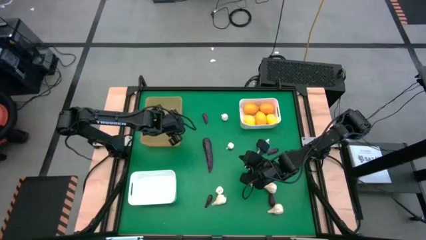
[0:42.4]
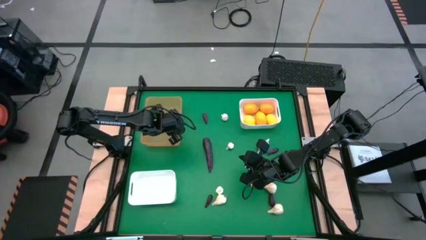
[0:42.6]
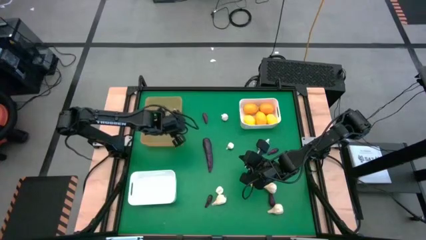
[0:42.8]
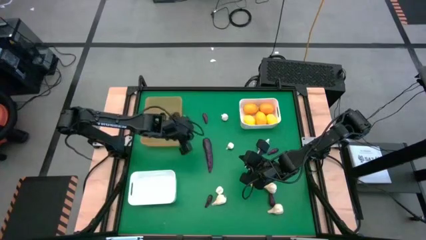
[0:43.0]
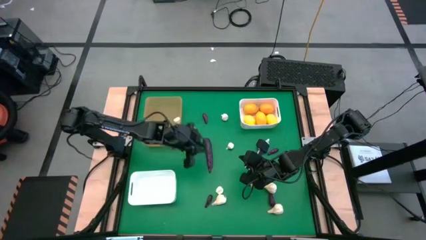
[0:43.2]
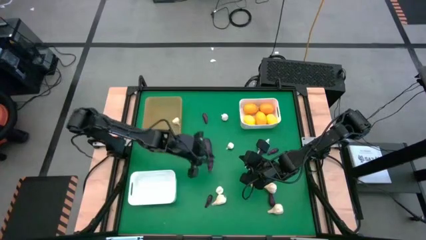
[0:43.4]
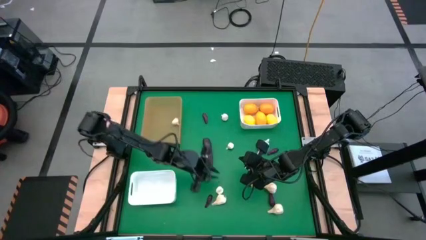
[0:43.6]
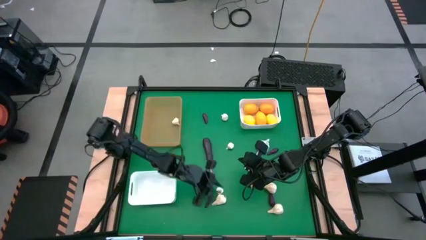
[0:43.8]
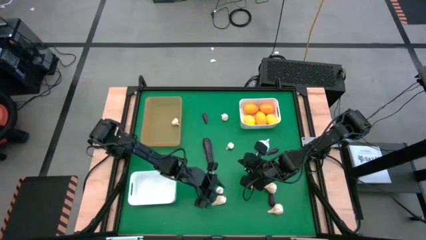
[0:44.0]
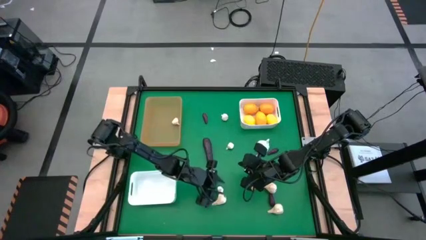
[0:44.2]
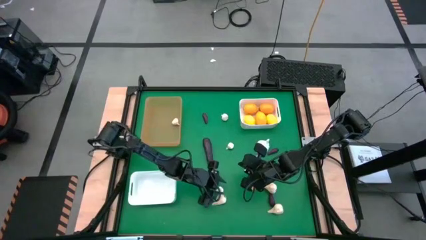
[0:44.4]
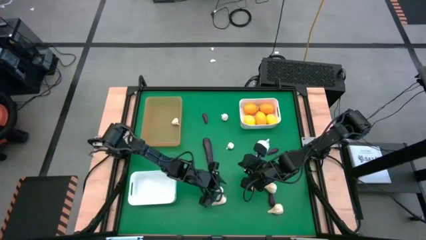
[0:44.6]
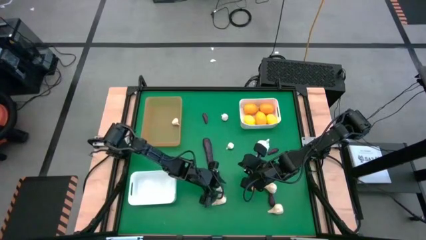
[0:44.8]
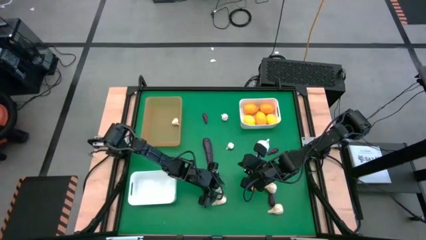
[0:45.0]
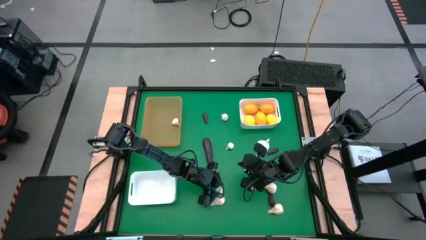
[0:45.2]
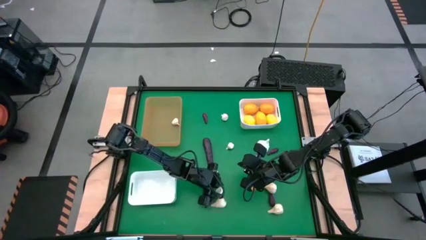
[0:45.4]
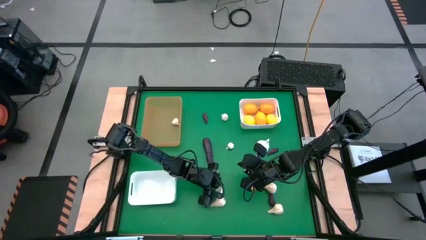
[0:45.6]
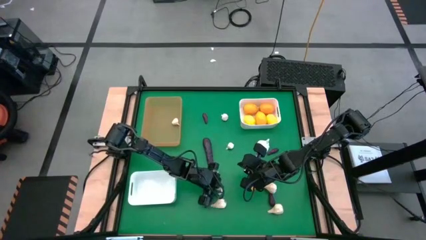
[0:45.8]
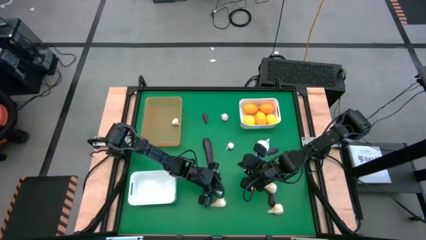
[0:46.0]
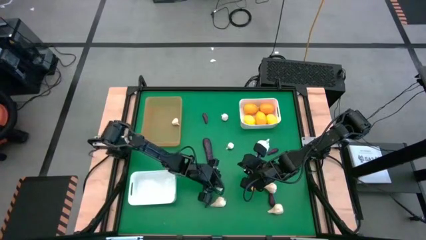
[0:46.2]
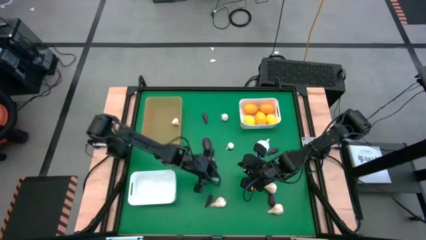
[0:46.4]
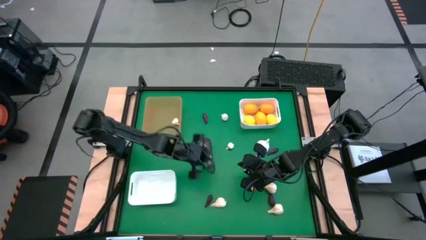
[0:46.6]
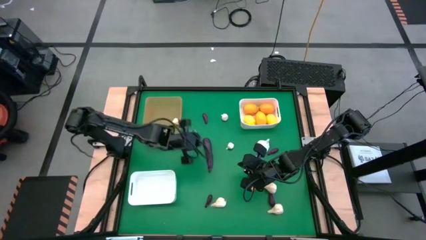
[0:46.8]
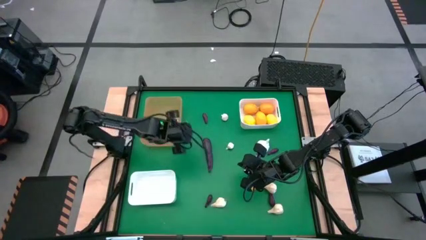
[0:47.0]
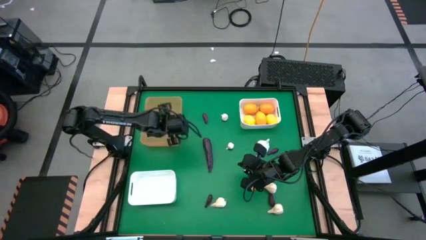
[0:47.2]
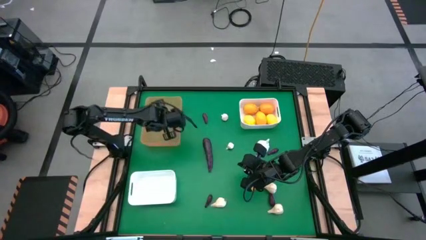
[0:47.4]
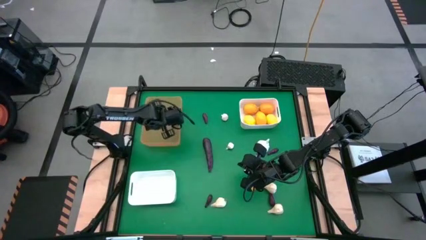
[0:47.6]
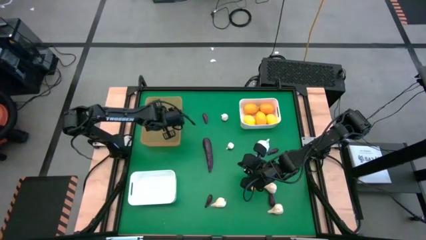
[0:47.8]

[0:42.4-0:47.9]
Task: Sort produce into baskets
Put the white garlic into the orange bin

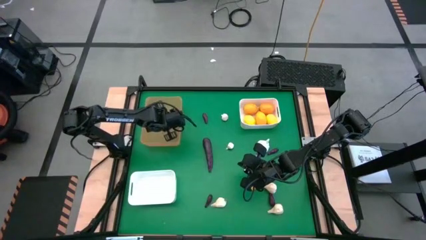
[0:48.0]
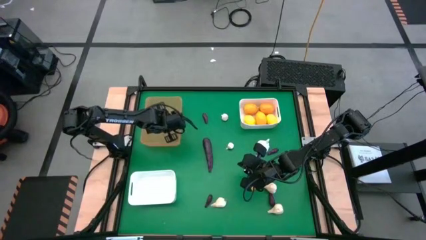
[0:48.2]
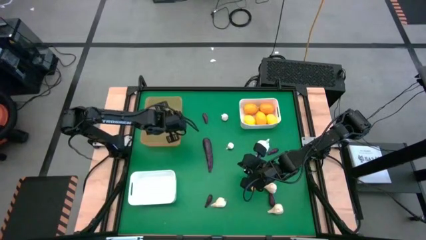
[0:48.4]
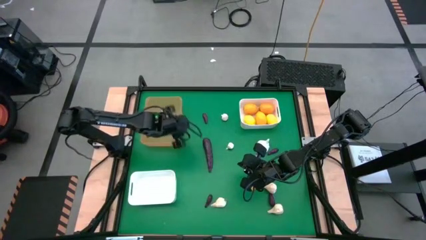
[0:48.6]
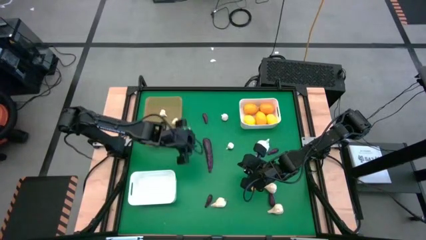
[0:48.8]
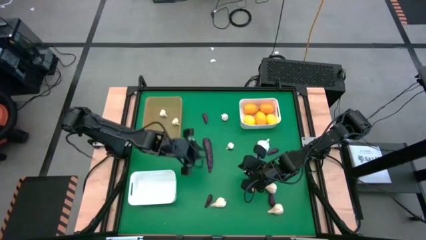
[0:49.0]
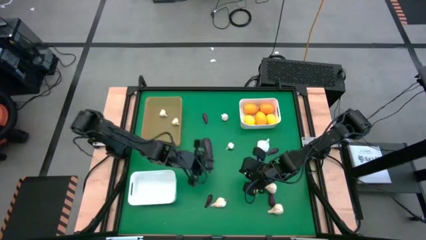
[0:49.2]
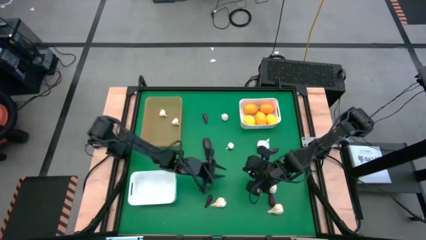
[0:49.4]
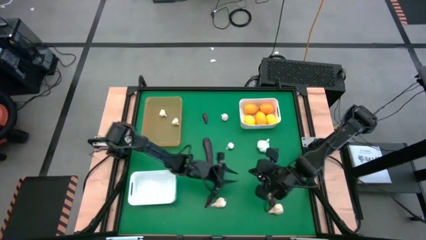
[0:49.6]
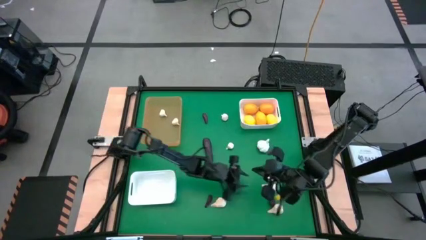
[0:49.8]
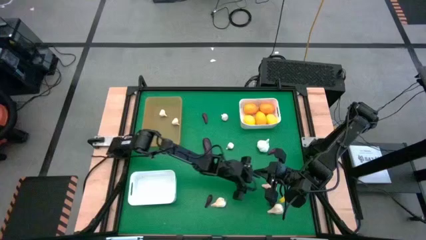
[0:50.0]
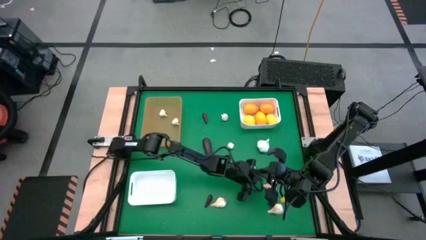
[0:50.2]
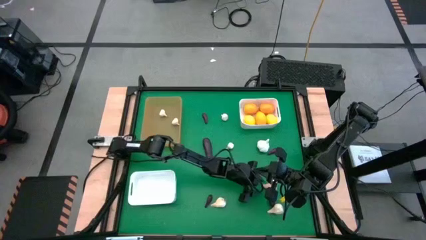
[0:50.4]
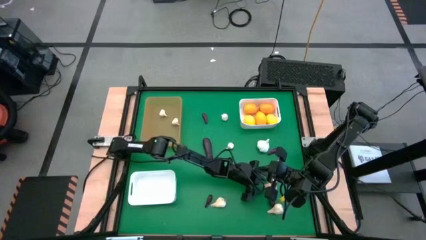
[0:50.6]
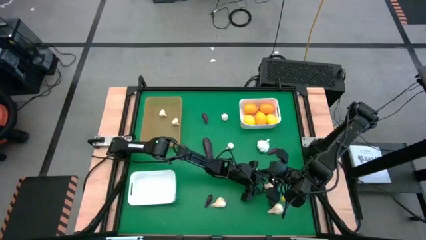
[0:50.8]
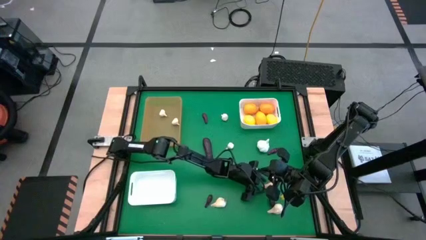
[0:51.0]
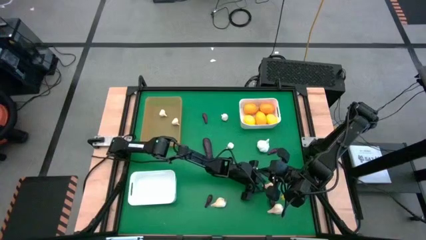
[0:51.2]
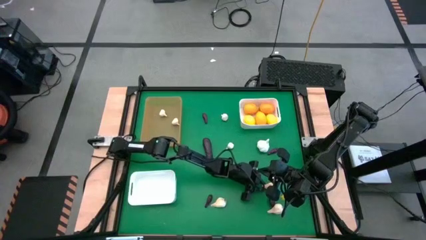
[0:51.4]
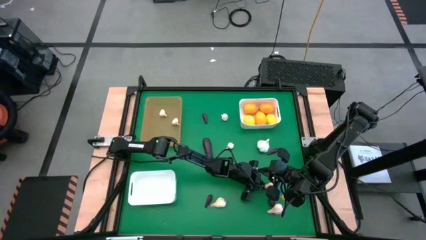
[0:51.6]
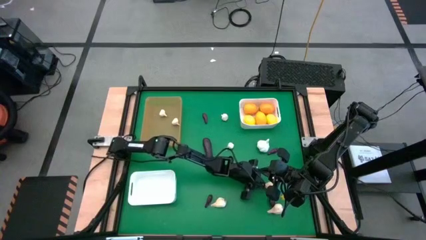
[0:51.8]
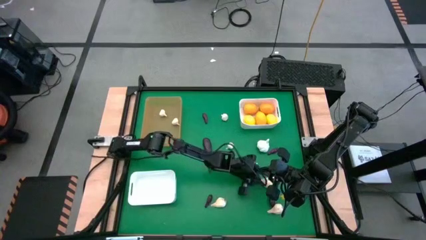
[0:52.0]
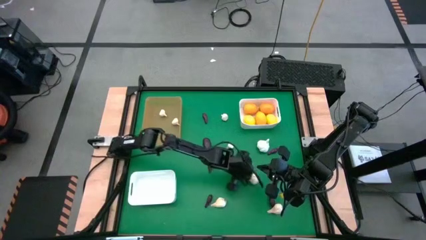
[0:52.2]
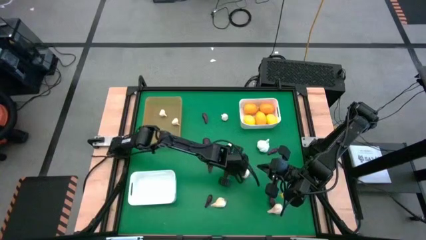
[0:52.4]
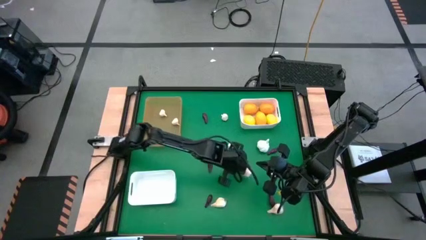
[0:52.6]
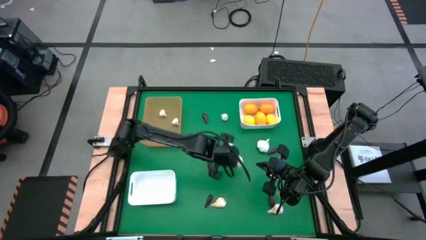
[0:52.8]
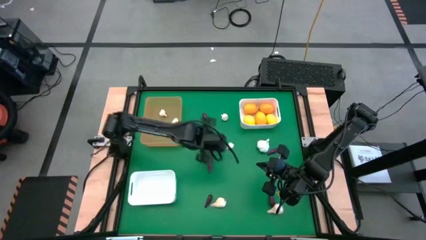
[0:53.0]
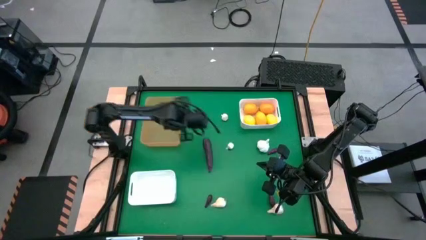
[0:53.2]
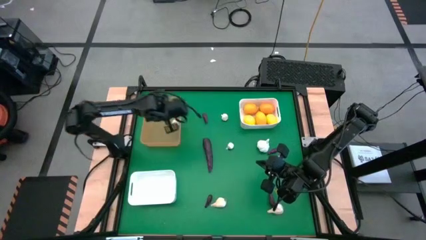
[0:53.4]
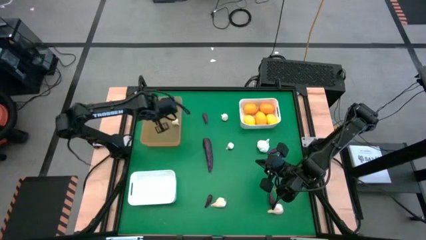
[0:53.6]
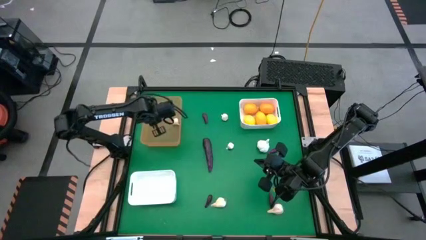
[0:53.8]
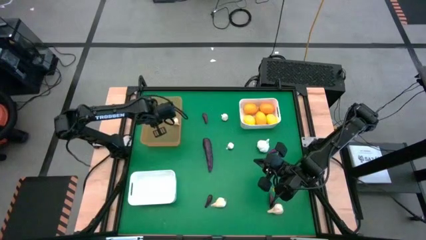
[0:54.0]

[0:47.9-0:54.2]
Put the white garlic into the orange bin

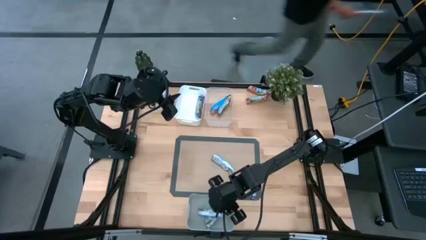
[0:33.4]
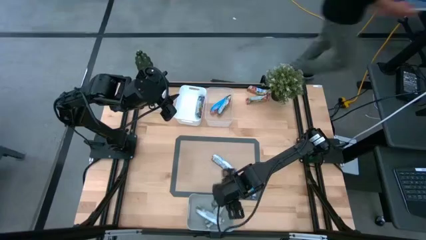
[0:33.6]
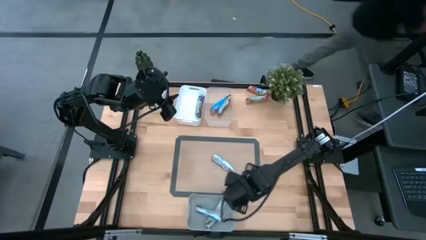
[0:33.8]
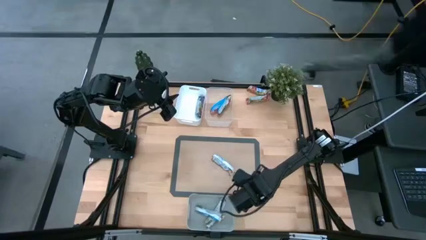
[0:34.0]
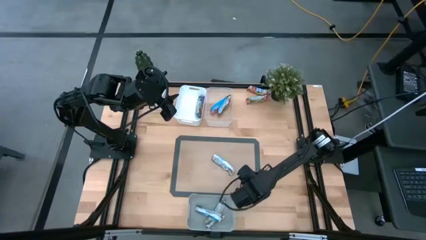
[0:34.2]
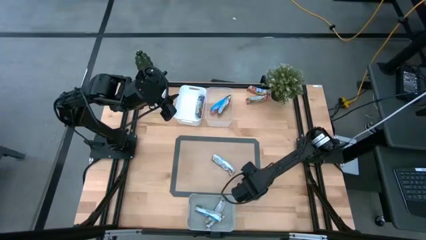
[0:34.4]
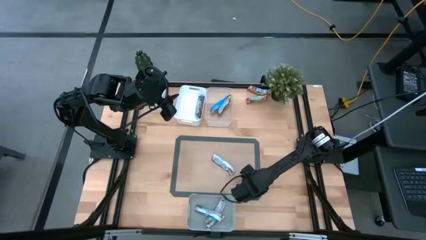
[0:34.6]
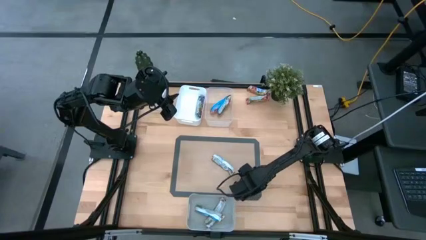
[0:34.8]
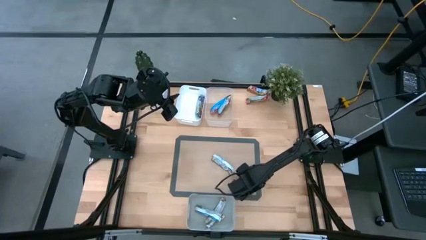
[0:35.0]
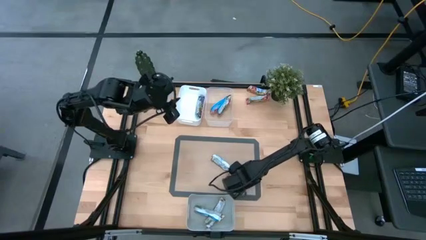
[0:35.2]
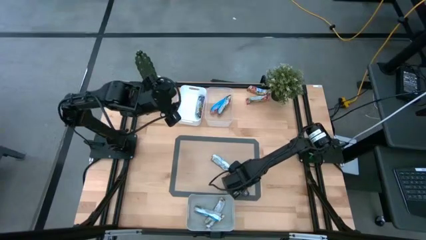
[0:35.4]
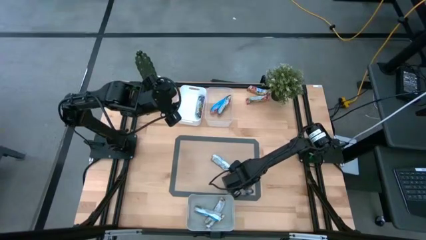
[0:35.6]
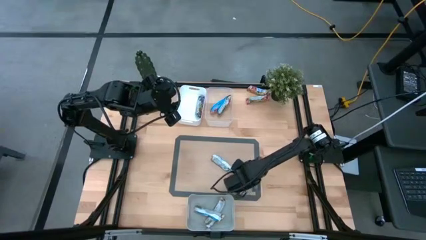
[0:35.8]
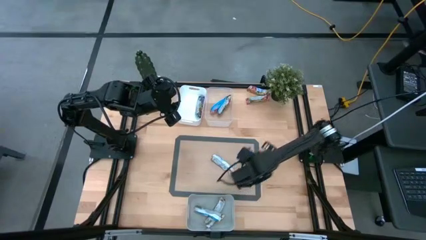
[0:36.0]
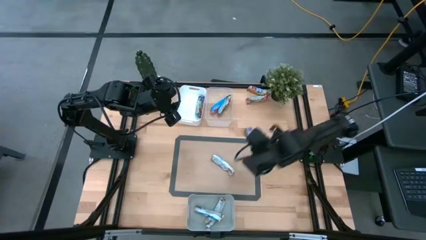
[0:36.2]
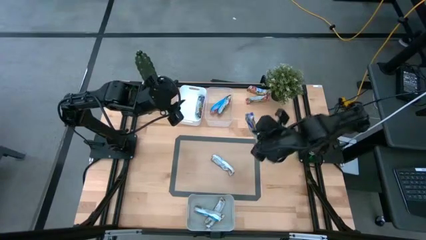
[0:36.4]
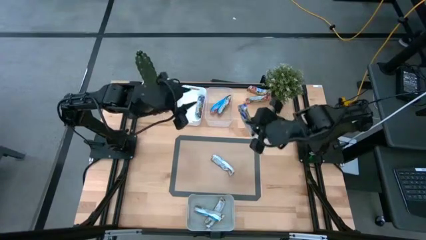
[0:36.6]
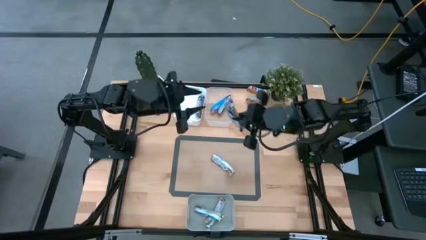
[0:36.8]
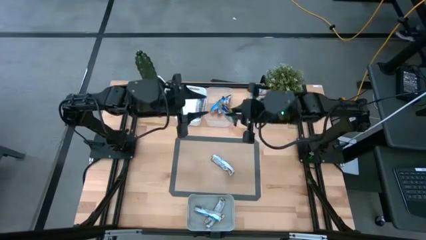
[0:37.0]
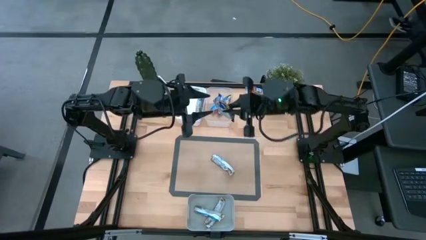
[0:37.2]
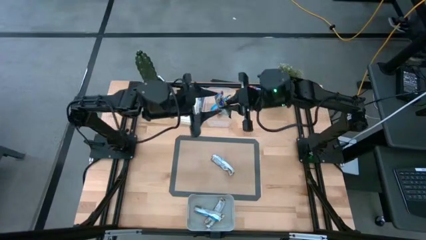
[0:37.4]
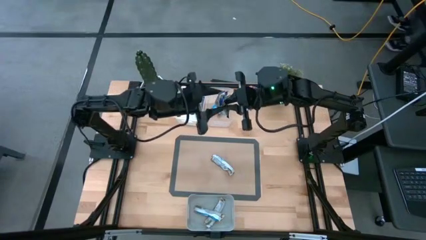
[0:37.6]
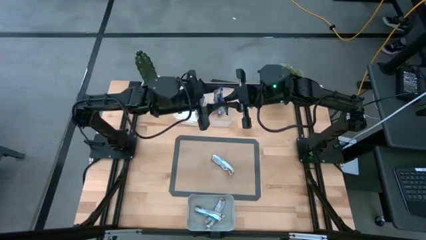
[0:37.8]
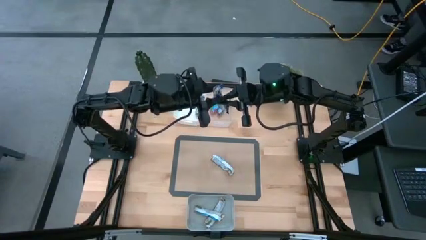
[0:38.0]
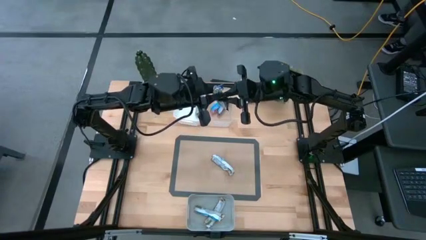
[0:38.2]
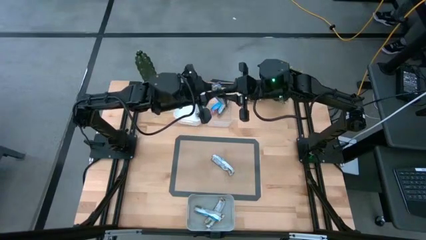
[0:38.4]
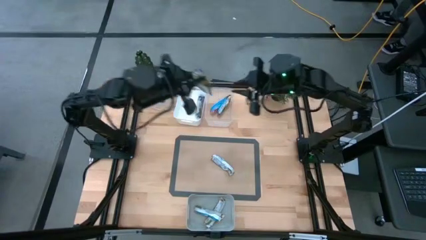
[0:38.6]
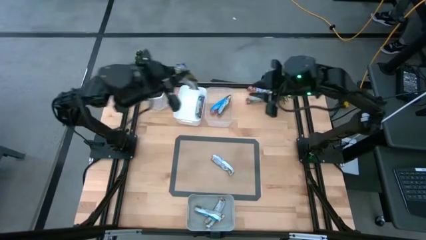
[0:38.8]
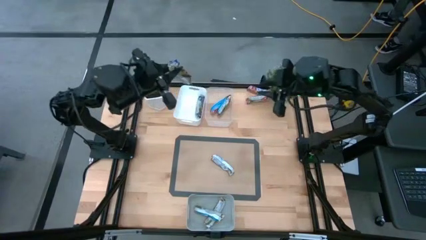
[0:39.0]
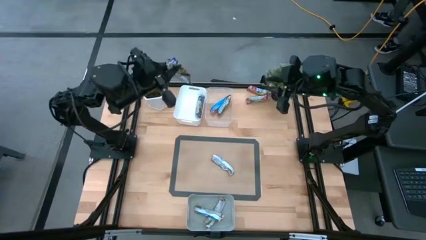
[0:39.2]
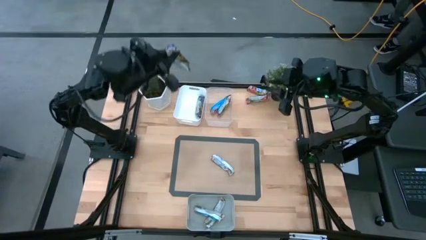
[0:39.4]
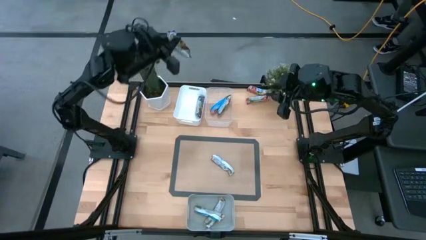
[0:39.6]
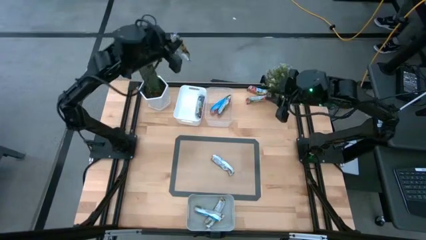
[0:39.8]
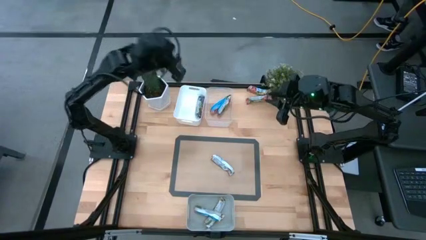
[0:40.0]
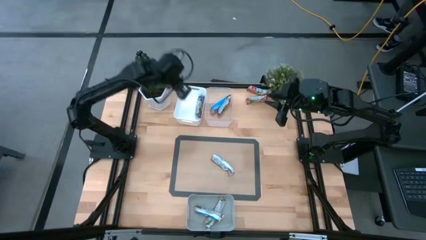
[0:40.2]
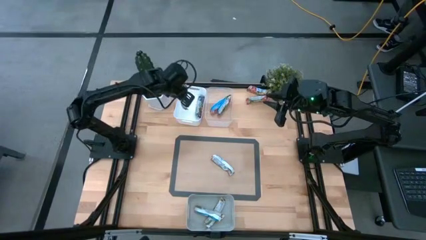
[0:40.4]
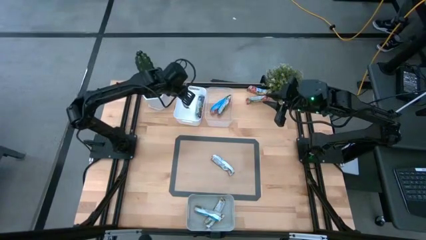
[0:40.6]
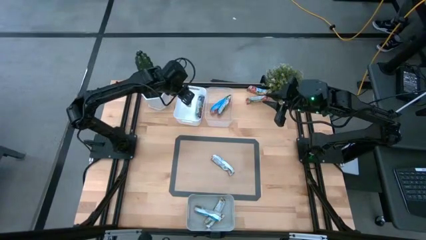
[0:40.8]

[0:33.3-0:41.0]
Task: Pick and place Granola Bars by type
Put the blue granola bar into the white bin
